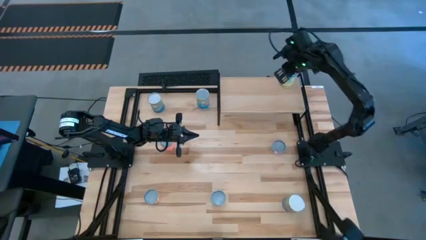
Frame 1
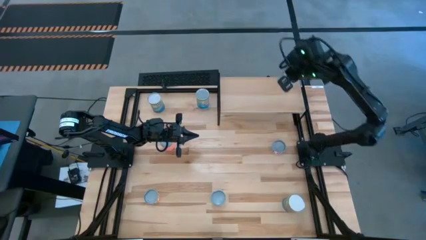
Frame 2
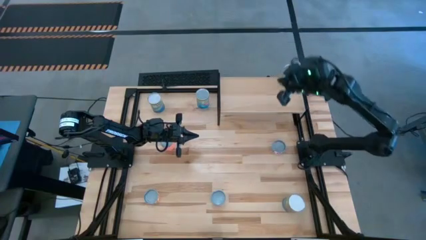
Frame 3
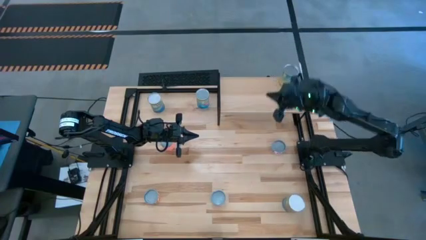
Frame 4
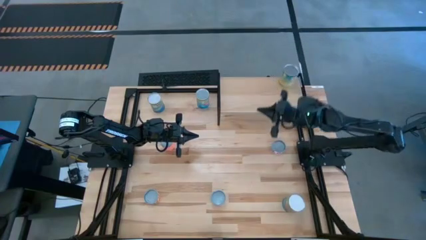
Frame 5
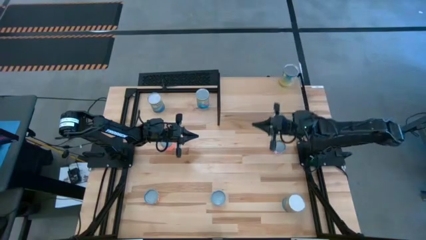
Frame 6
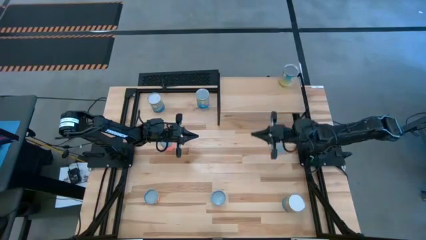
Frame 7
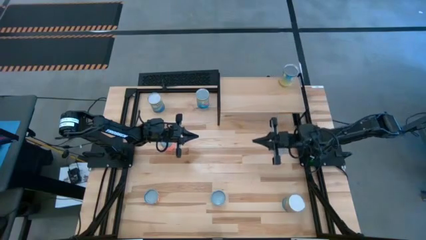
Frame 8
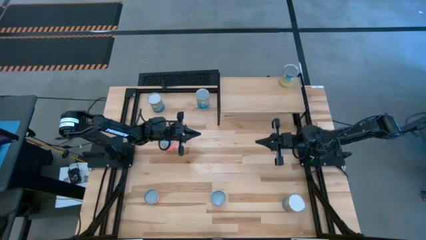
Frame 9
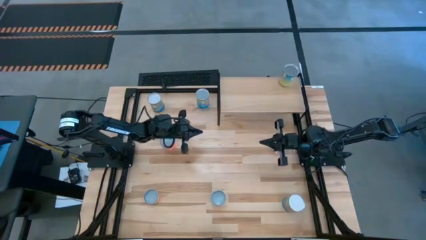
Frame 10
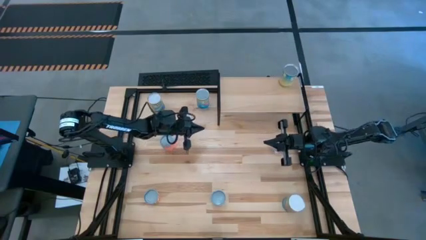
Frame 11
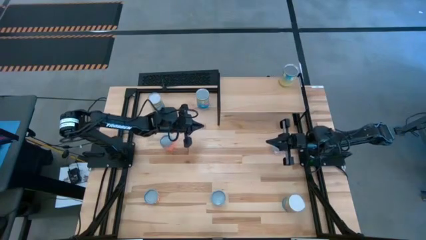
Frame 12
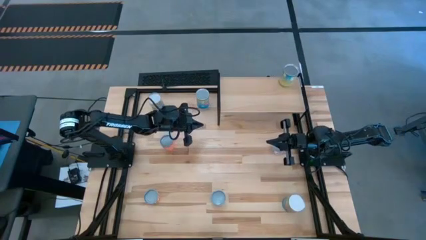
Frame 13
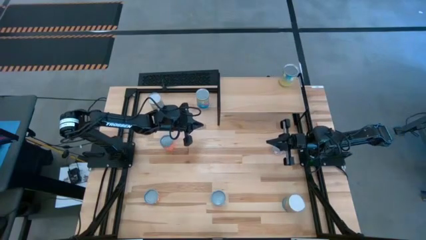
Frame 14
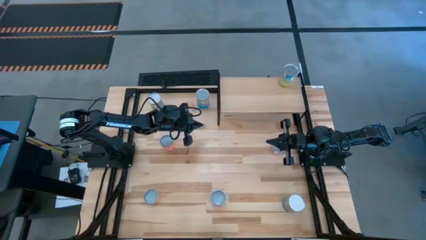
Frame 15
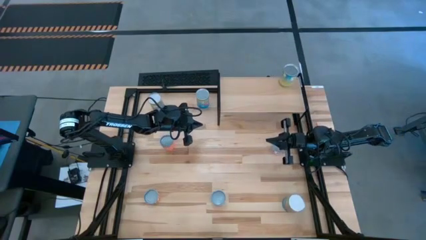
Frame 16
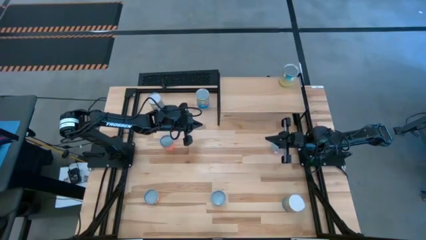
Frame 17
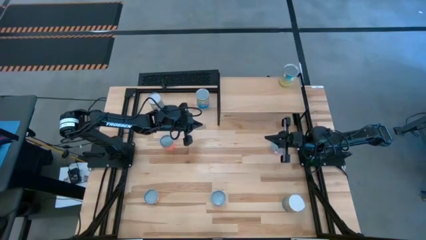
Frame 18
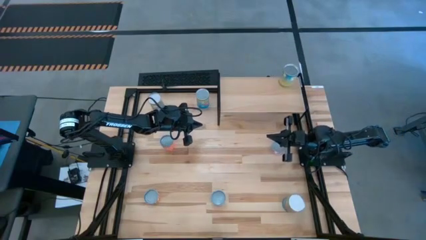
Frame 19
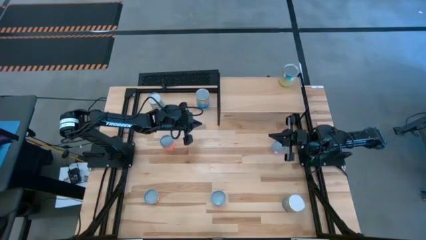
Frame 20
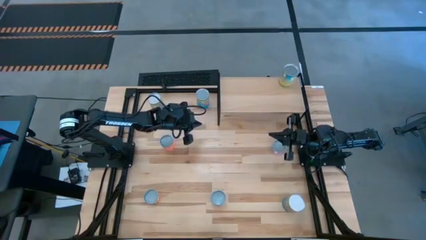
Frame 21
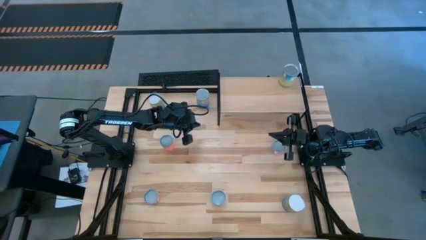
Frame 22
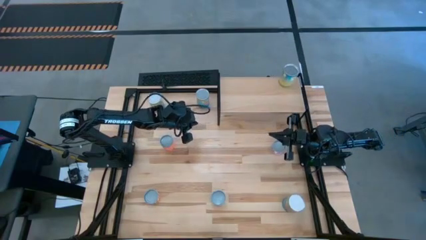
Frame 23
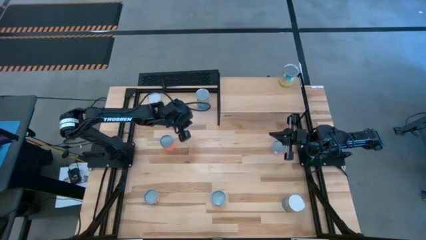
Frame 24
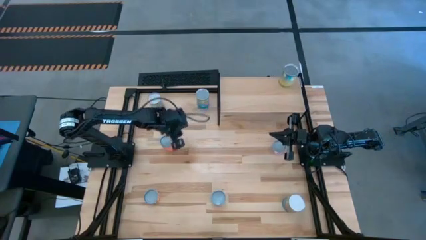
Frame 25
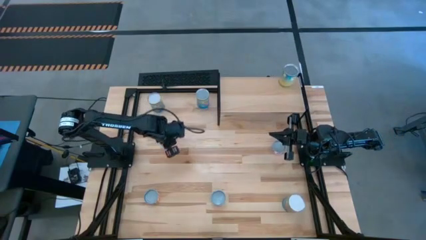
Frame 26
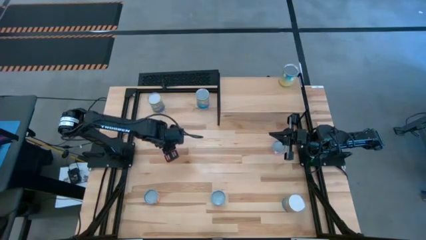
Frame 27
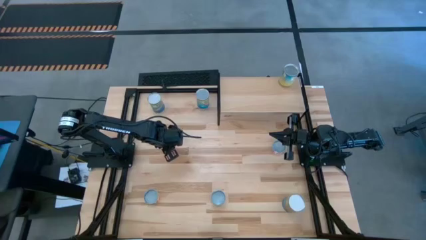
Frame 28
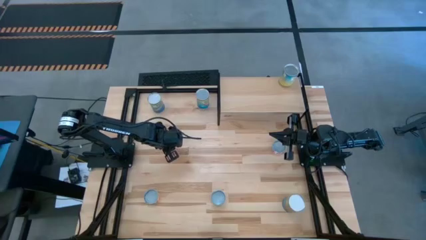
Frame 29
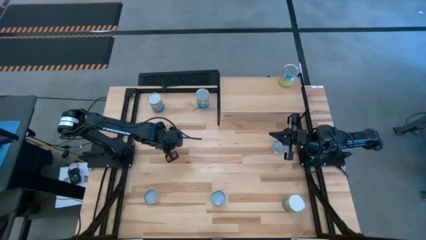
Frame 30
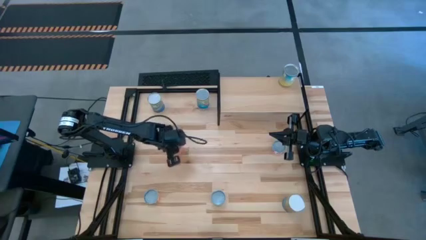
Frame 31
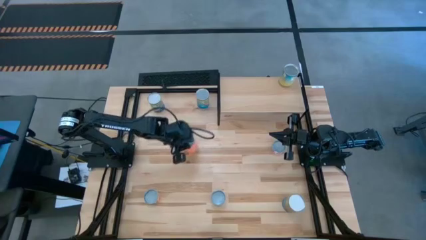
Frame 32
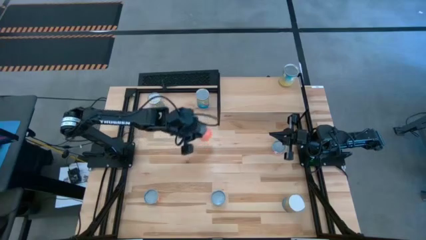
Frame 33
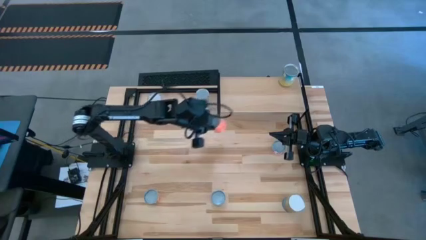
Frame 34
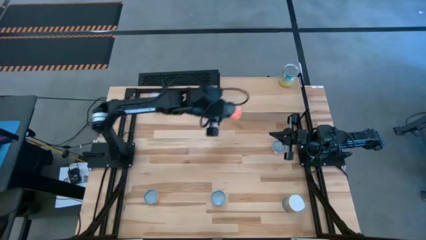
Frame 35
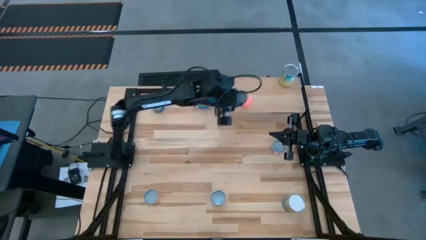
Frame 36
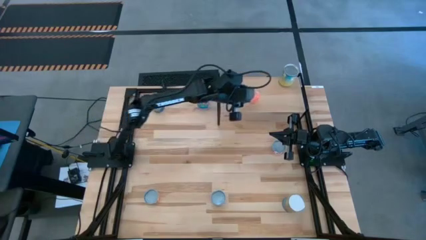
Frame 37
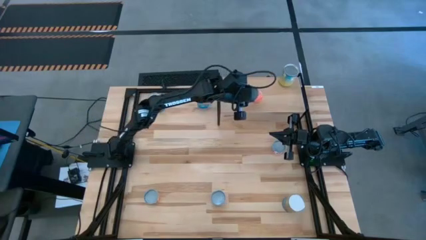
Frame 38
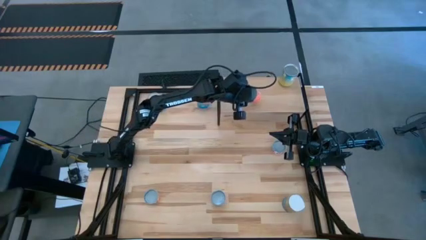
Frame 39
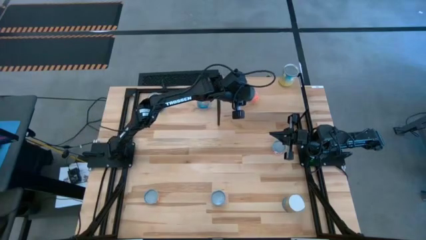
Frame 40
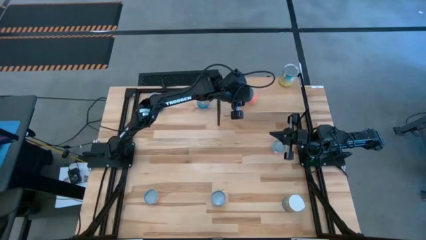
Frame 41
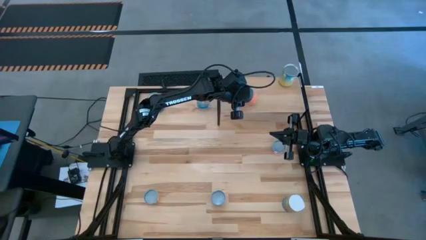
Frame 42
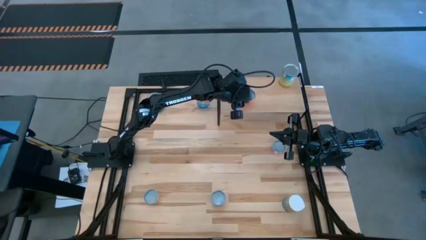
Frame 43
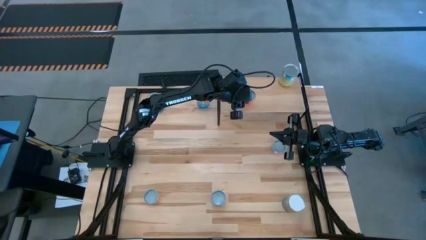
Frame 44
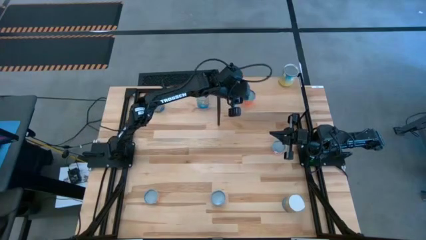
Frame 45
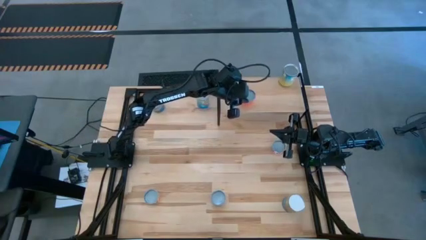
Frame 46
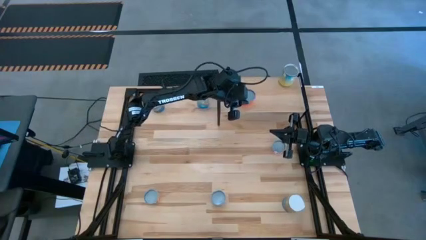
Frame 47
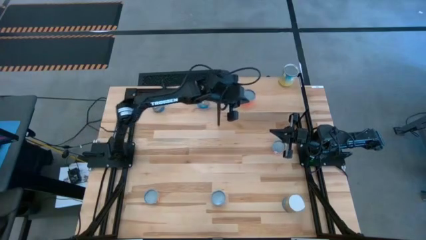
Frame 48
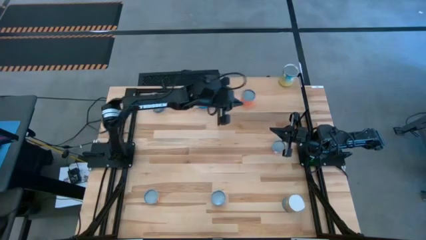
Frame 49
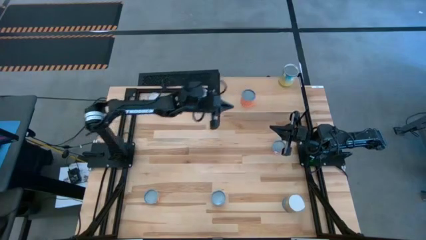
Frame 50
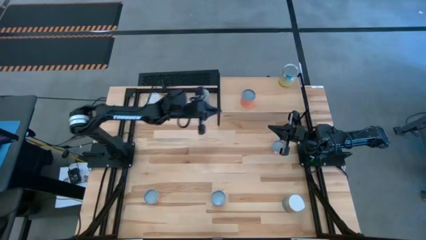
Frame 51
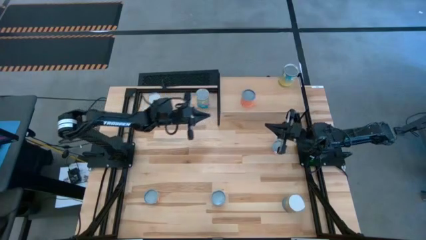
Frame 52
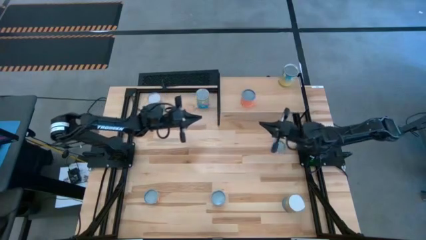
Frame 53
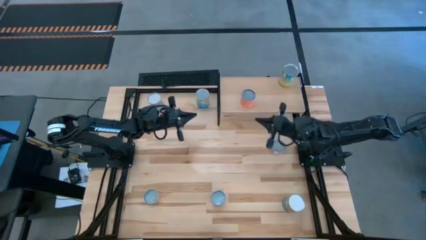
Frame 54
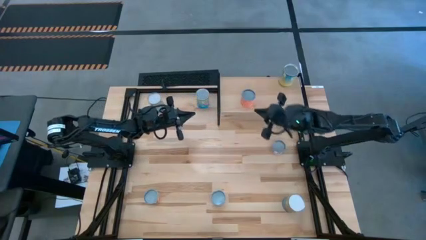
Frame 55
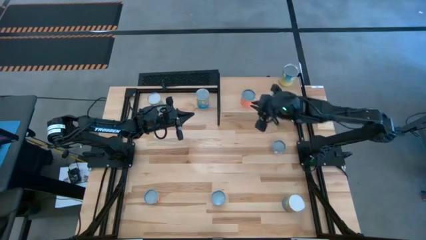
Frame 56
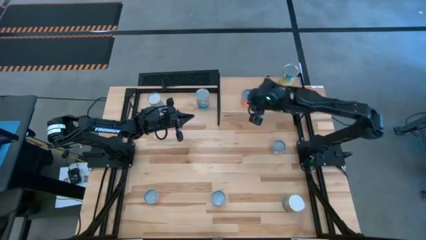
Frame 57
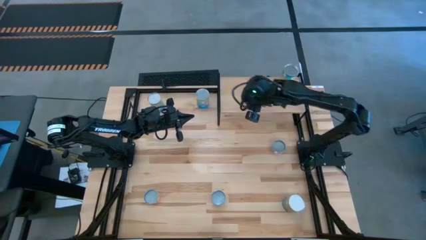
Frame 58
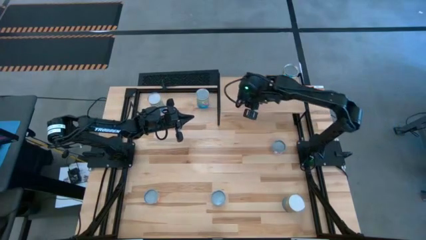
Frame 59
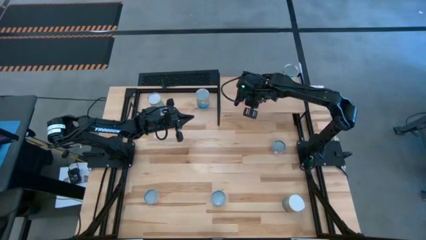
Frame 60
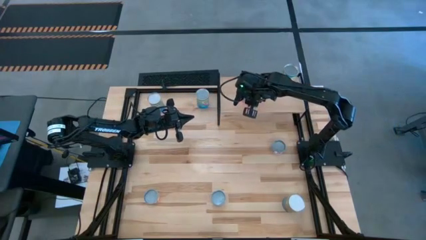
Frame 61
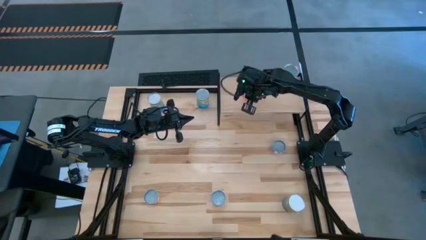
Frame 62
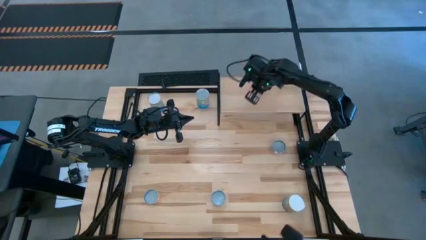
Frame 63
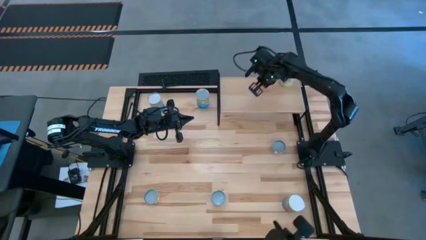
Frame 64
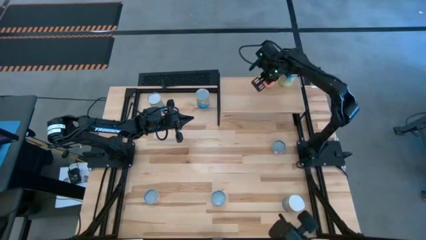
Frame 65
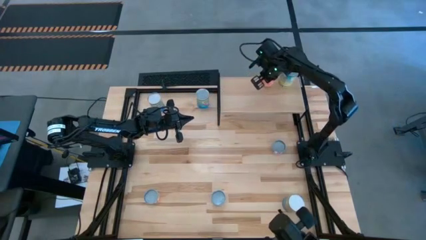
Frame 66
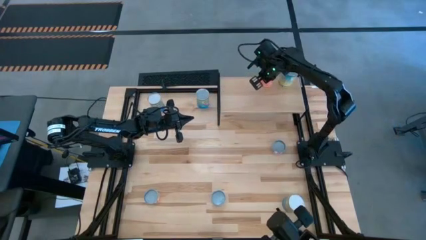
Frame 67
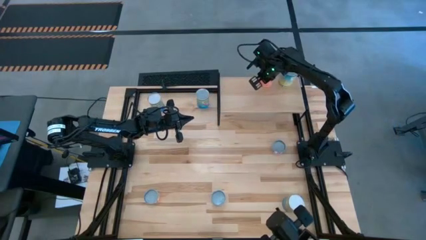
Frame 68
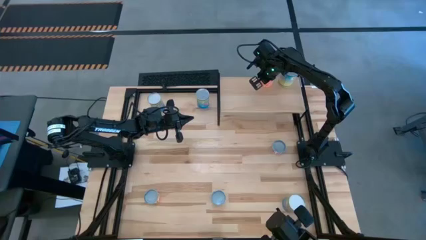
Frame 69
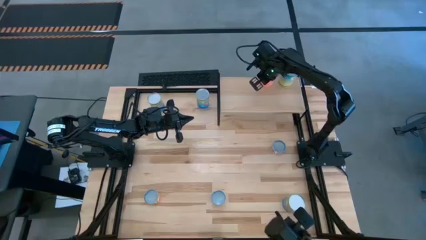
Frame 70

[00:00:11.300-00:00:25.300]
Task: Pick and place cans onto a shelf
Put the red can on the shelf
